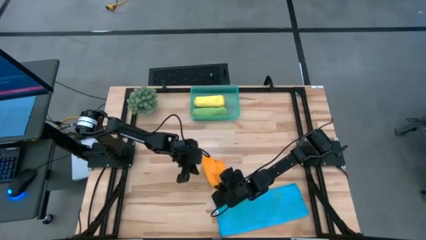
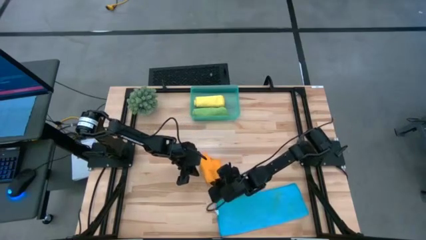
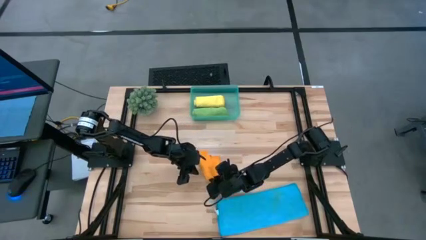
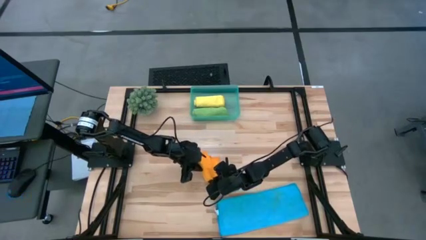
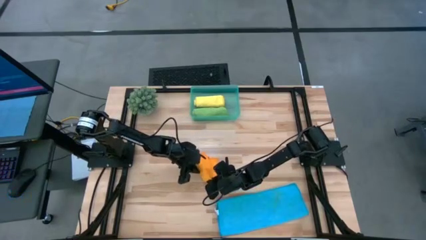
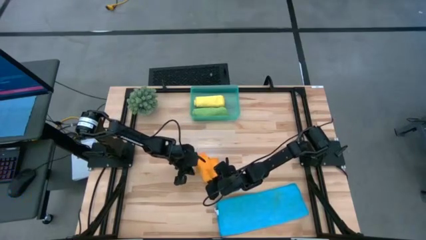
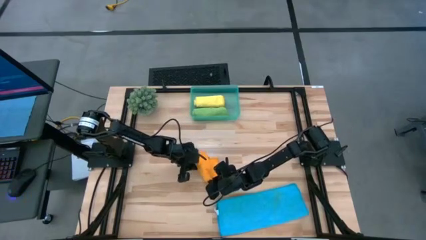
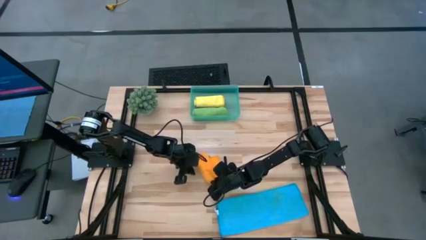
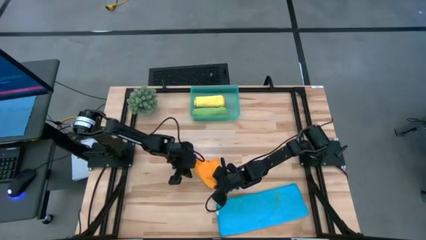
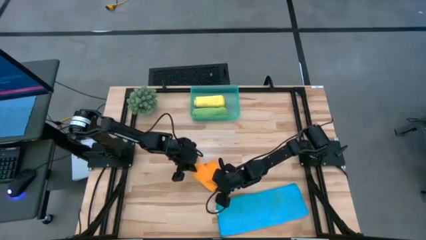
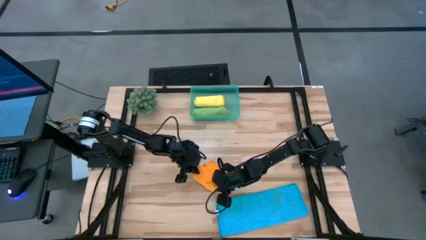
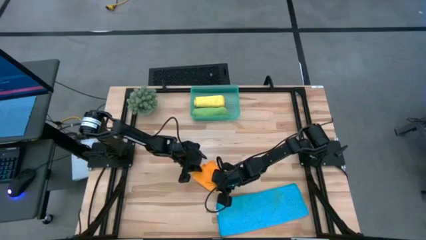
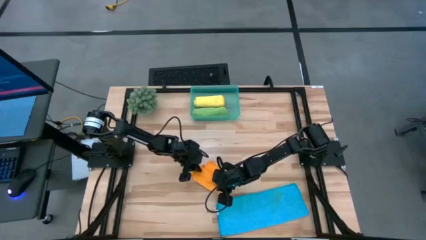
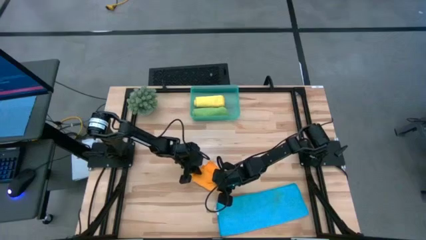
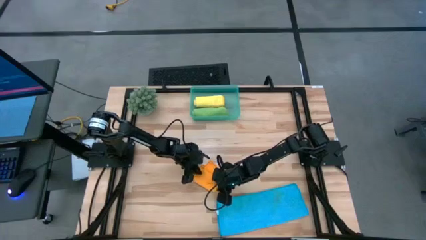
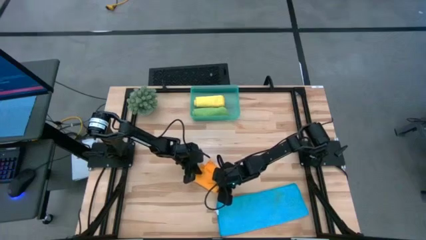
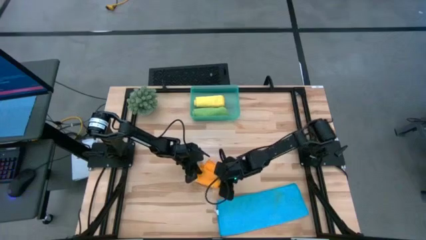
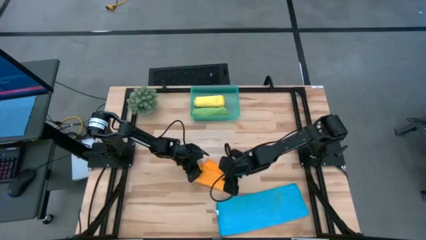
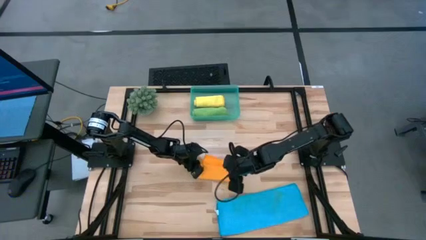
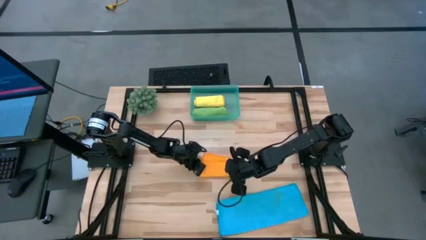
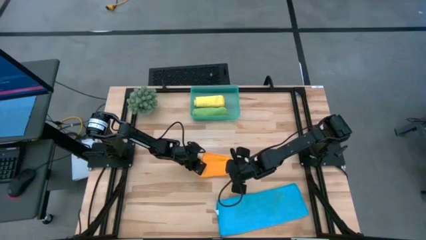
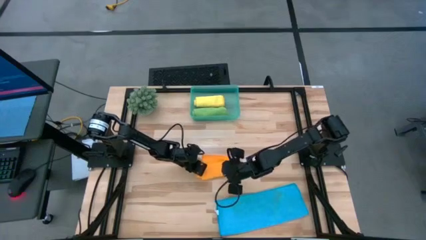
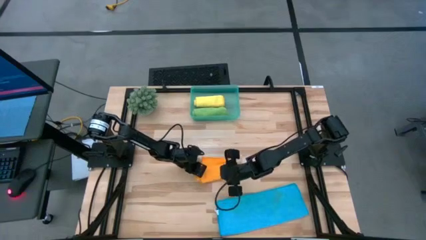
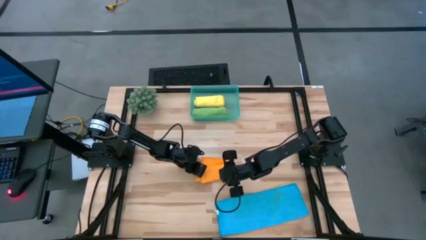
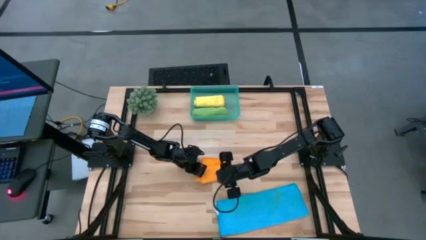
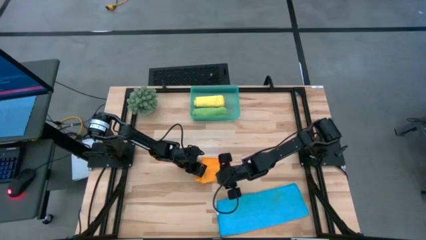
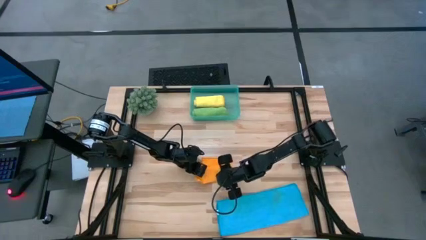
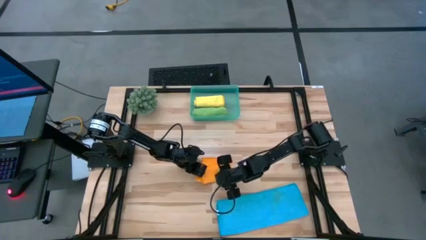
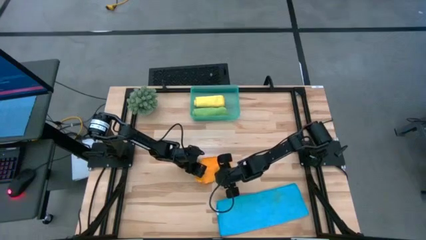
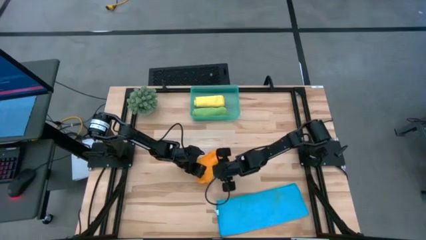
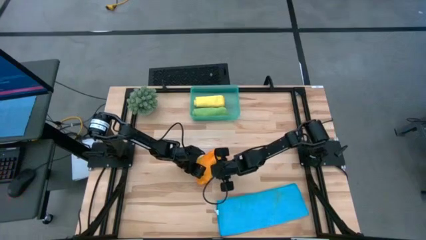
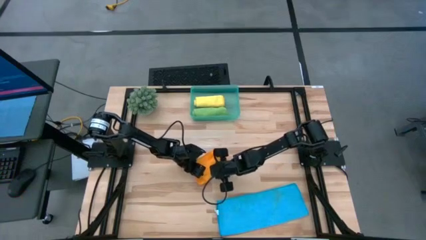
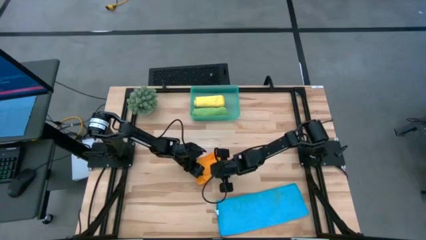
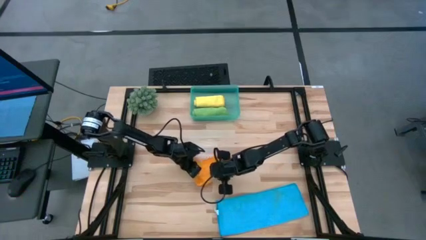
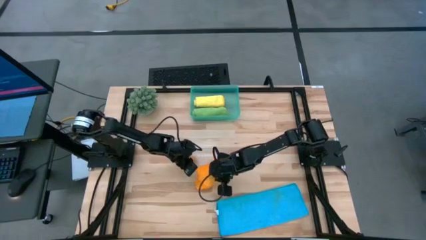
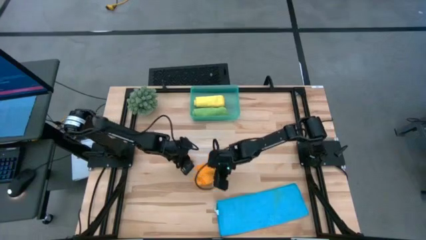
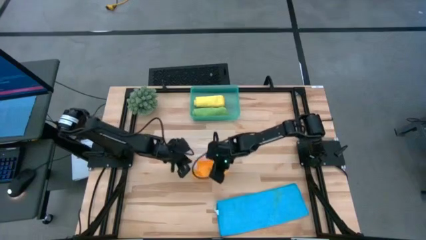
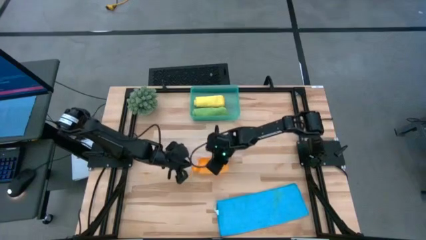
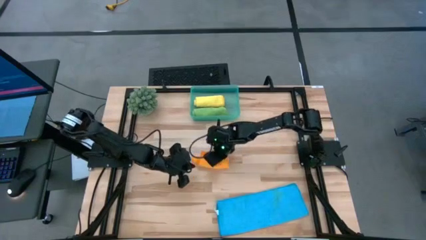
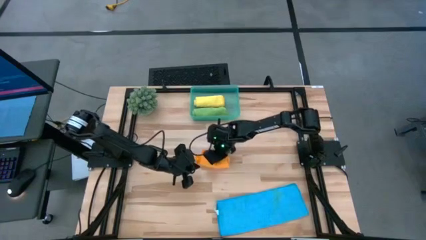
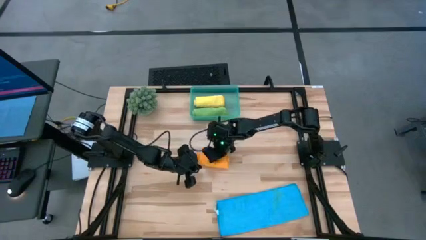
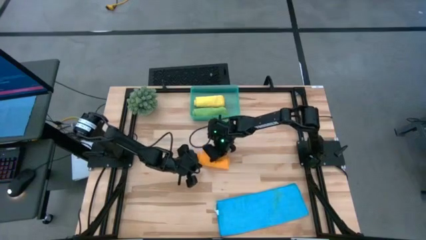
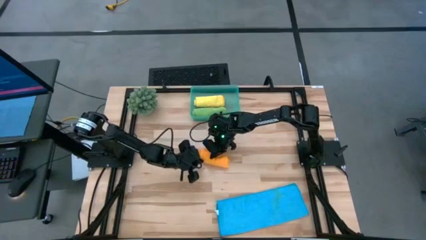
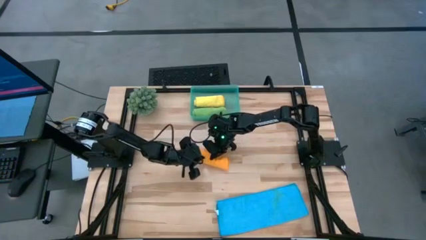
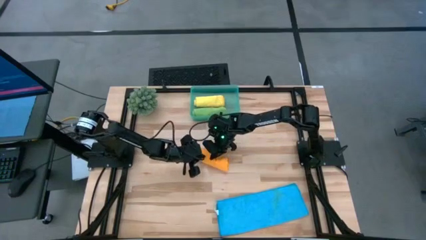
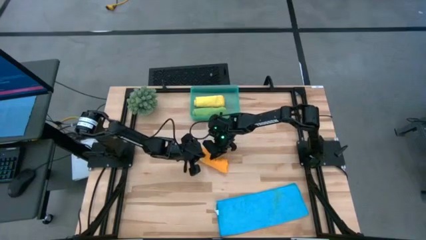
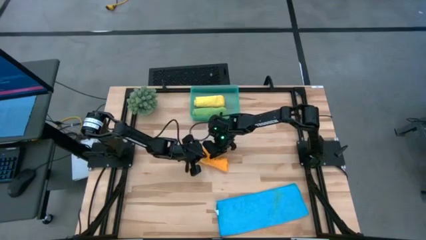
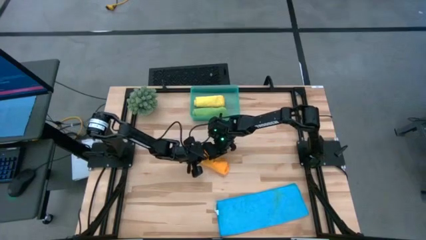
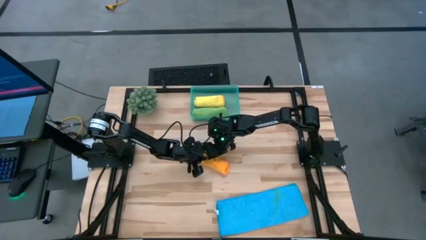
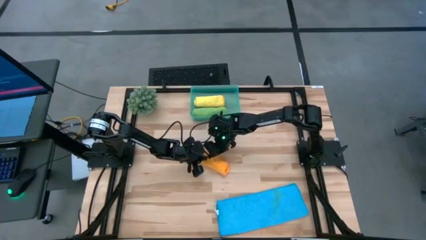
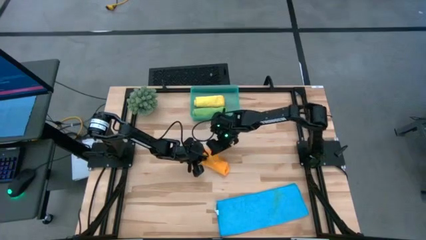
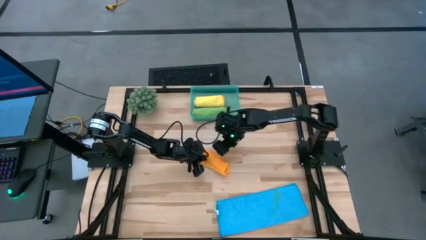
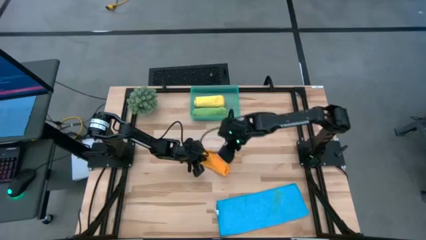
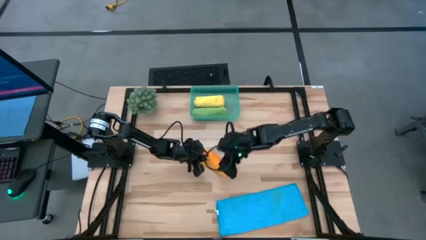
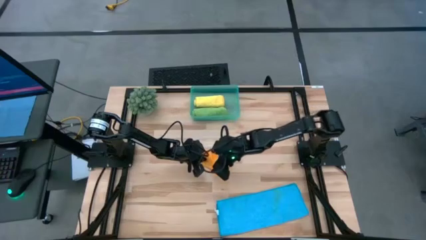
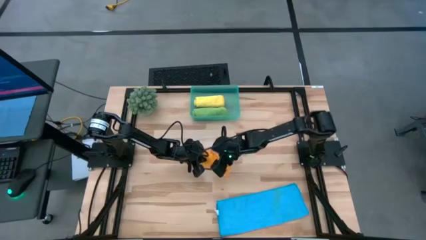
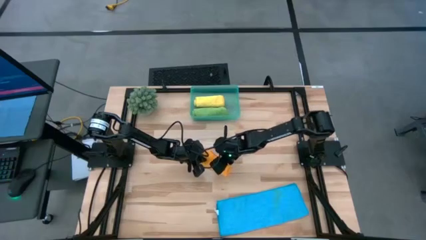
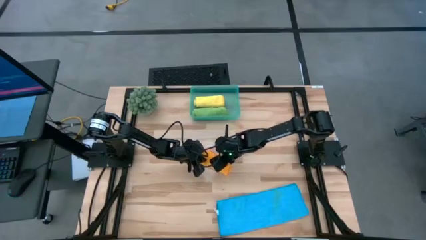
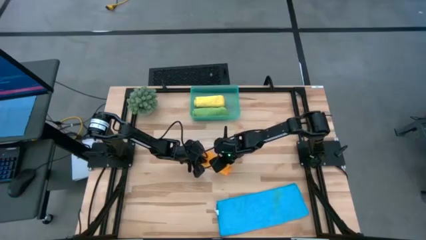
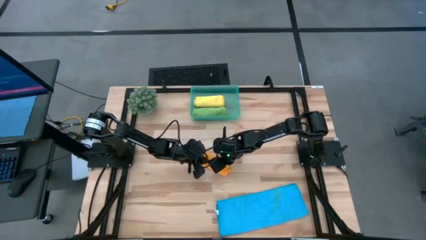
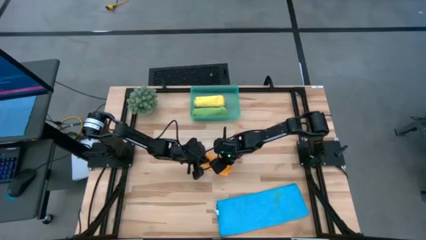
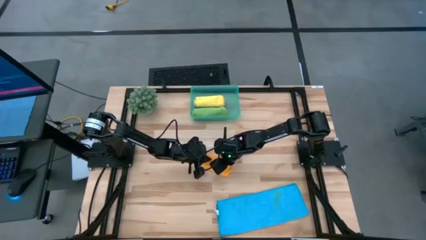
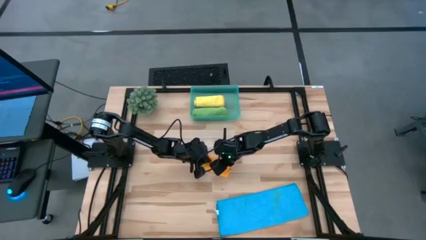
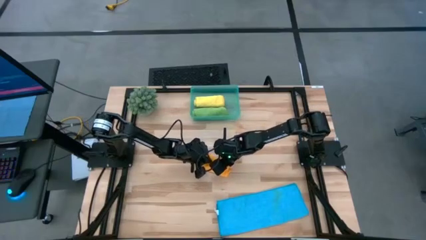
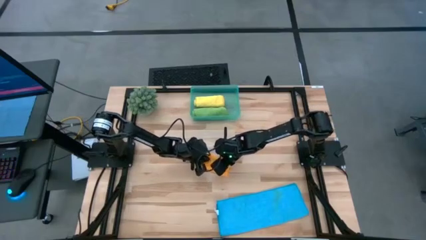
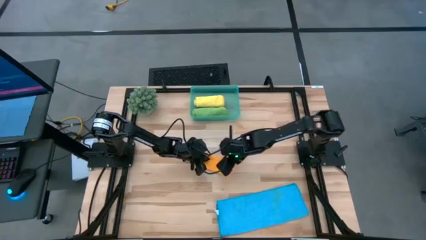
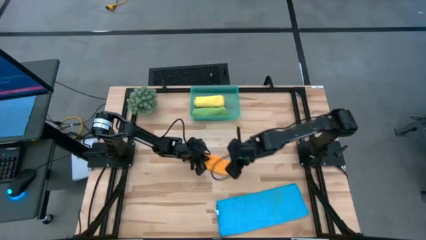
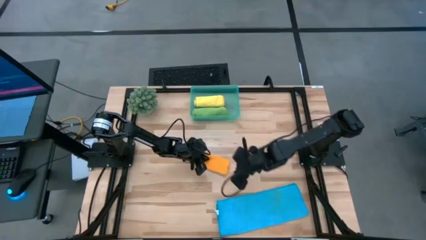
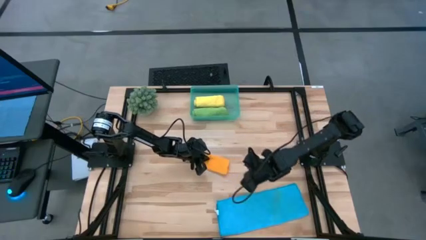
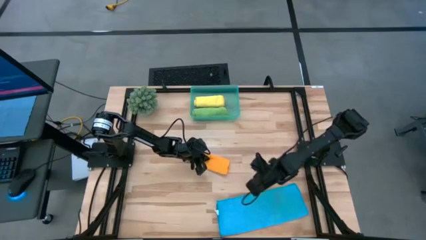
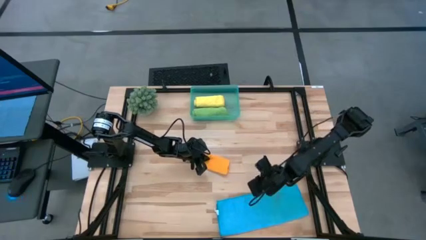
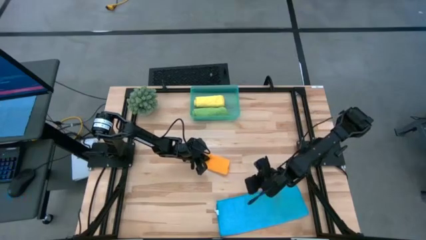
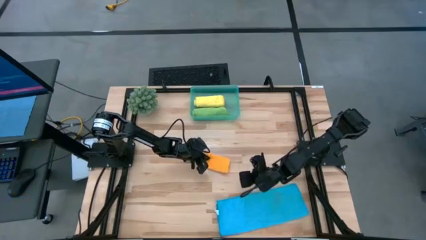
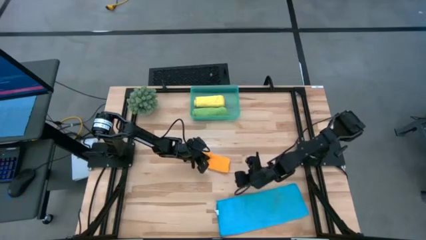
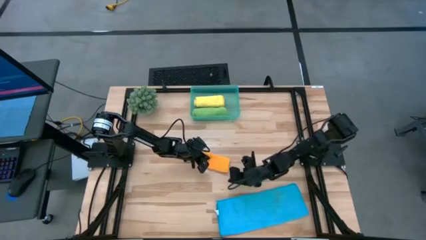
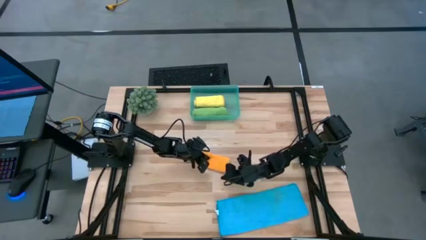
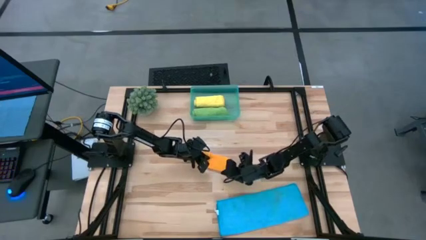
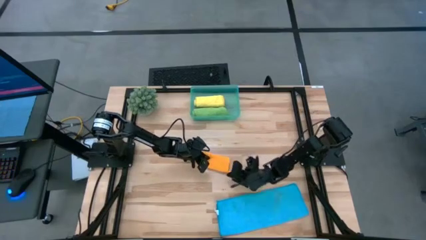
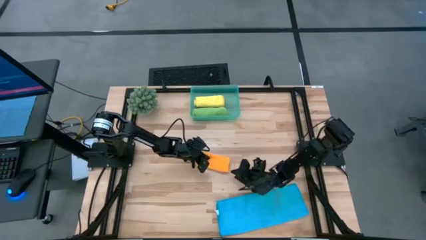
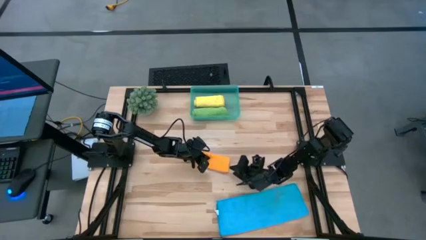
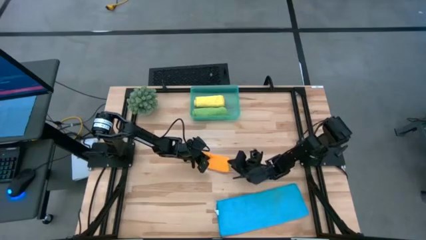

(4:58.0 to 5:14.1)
Task: Roll microfiber towels into tight, uniform cylinder then place into a basket
Roll the orange towel
